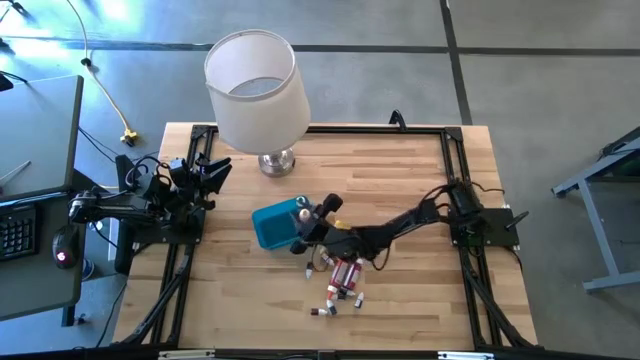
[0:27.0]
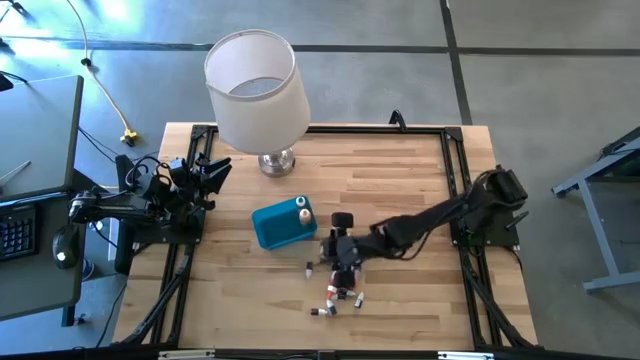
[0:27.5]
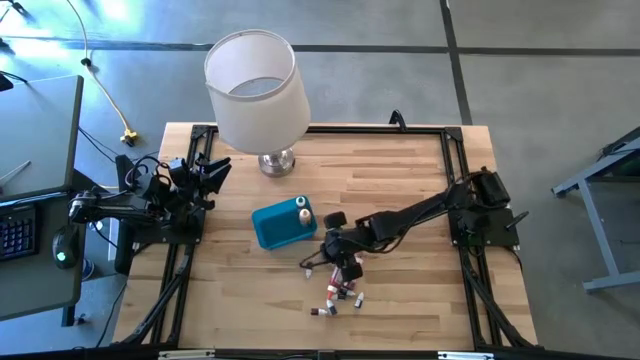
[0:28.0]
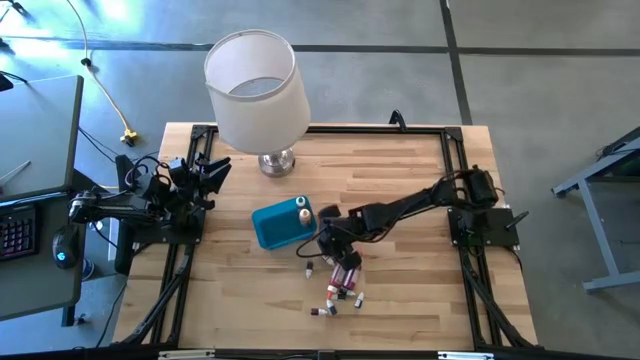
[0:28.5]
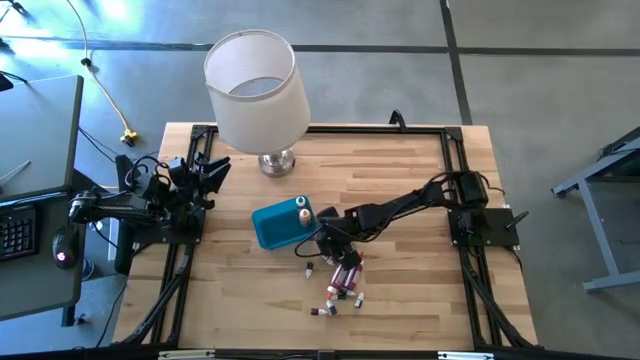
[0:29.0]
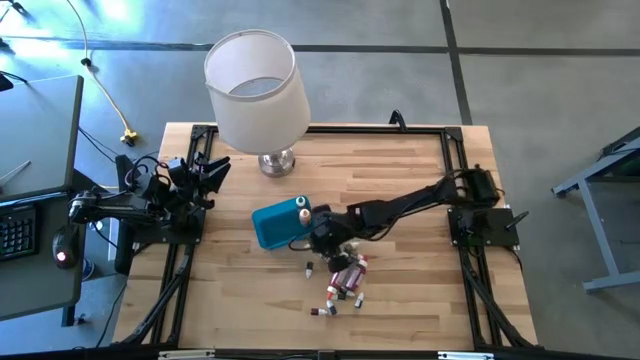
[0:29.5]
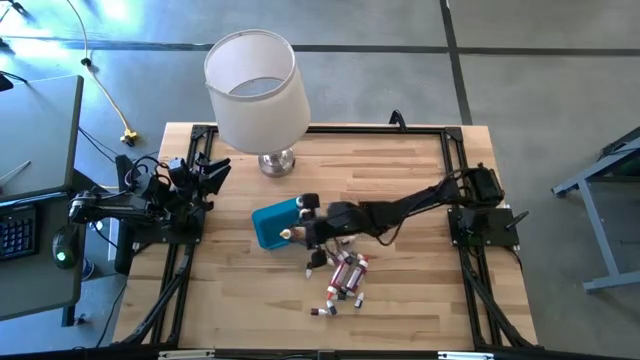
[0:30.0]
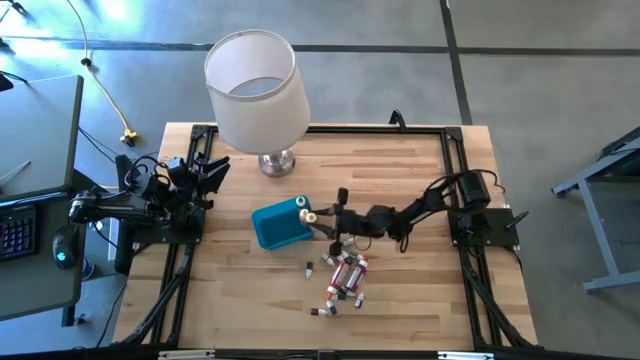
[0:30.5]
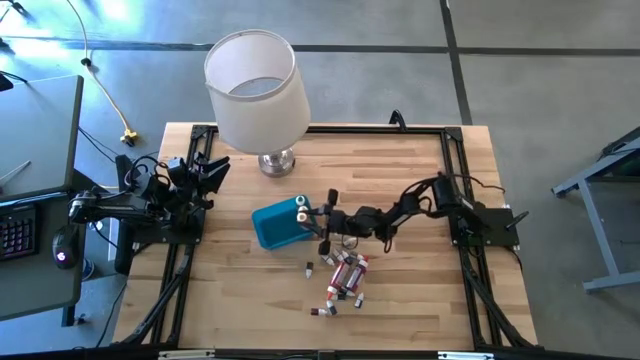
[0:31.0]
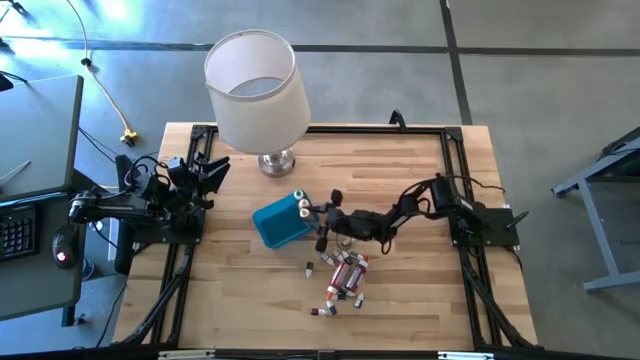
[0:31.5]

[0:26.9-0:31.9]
Task: Pick & Place food coloring
Put the large yellow food coloring bottle into the blue bin

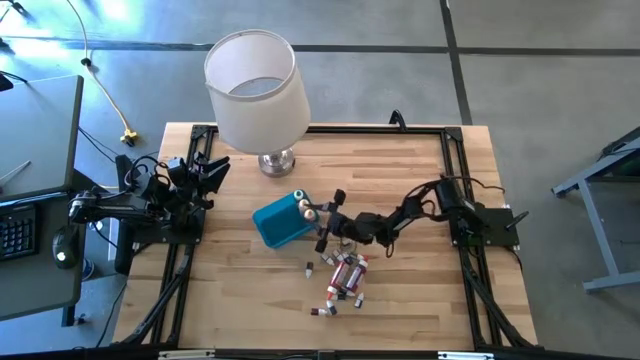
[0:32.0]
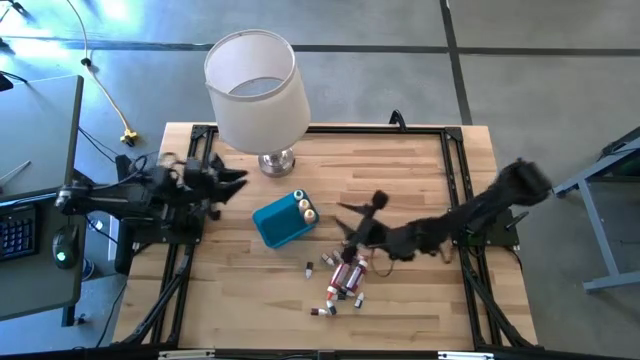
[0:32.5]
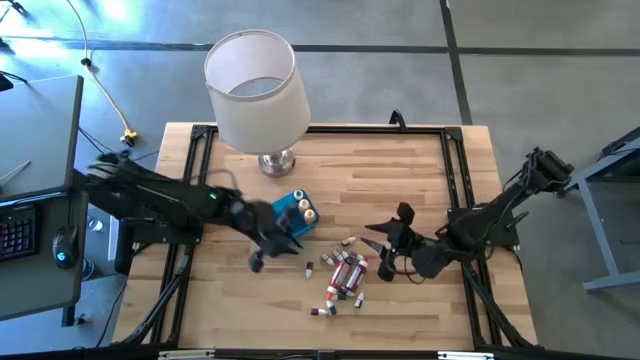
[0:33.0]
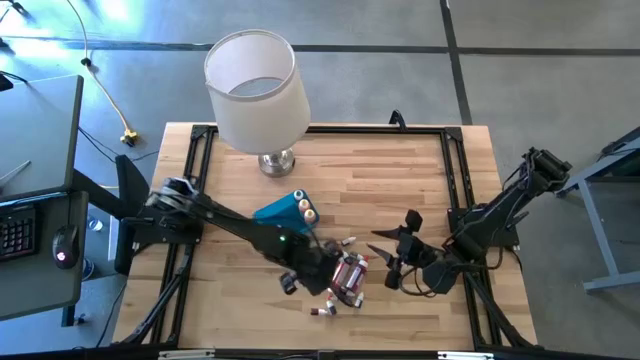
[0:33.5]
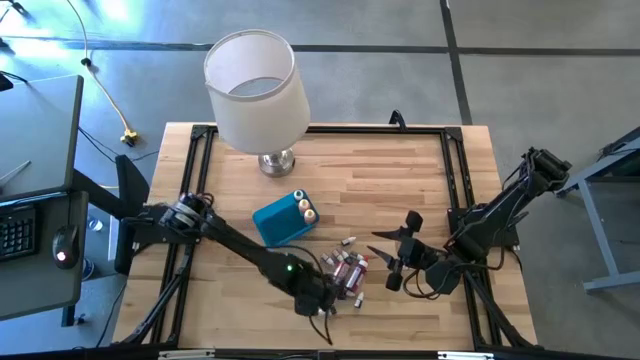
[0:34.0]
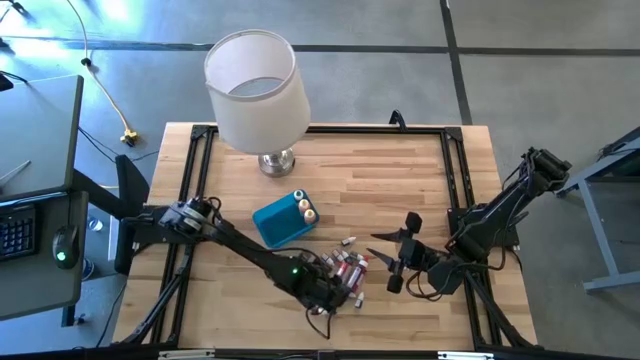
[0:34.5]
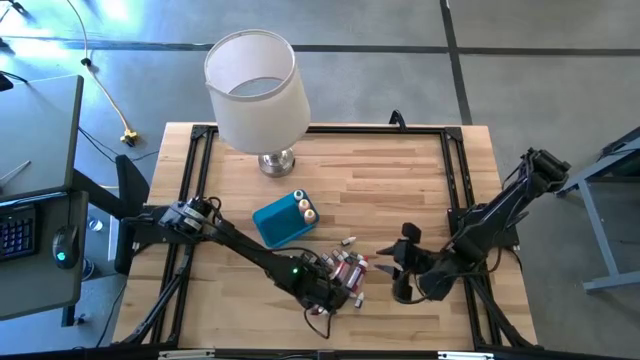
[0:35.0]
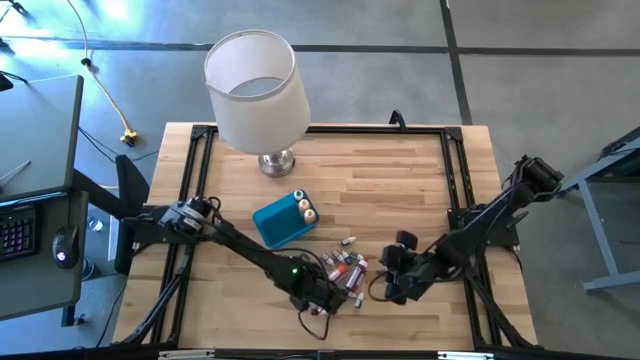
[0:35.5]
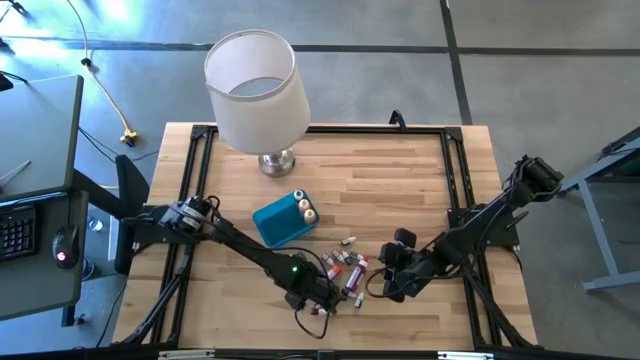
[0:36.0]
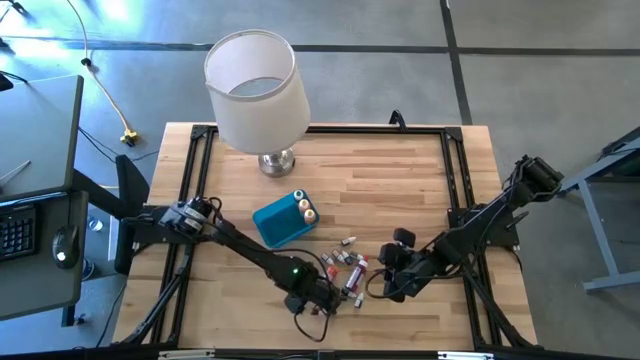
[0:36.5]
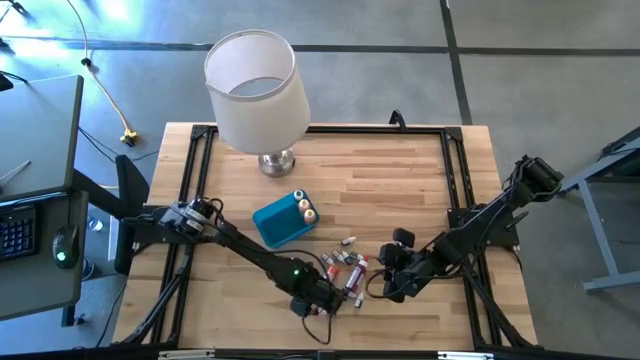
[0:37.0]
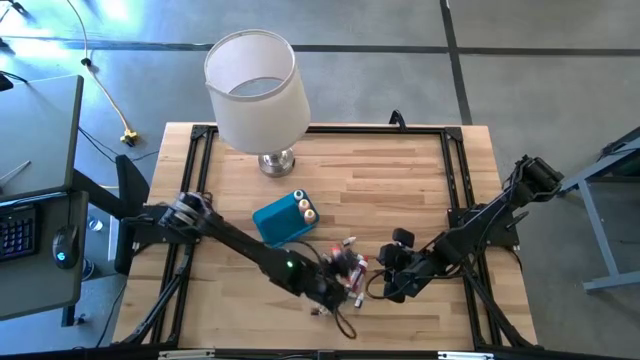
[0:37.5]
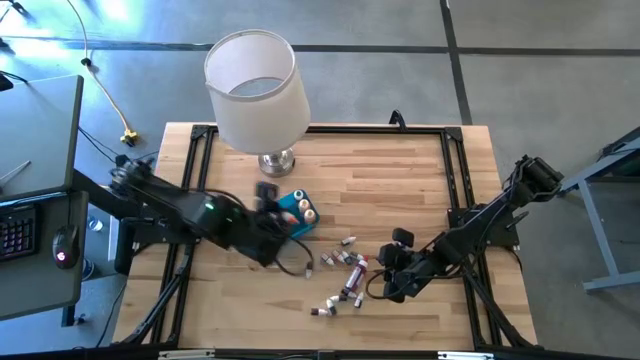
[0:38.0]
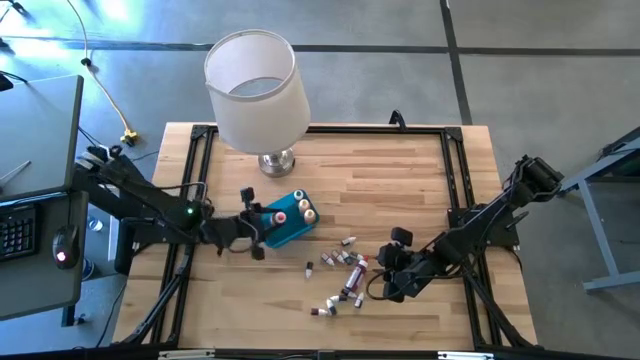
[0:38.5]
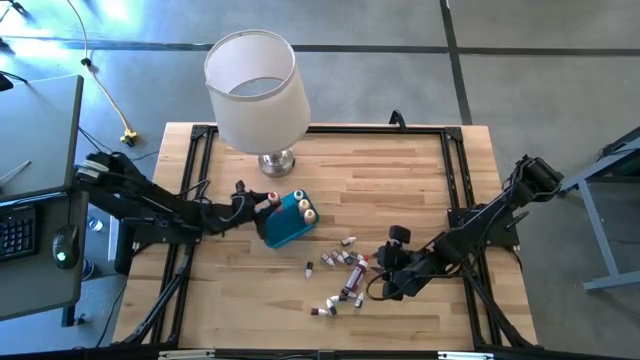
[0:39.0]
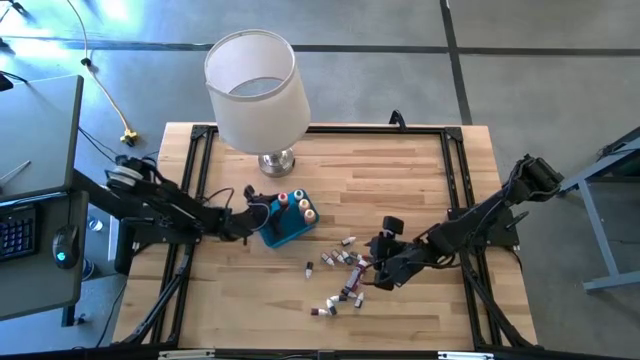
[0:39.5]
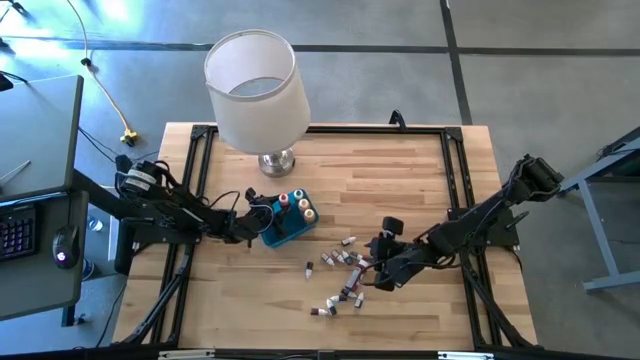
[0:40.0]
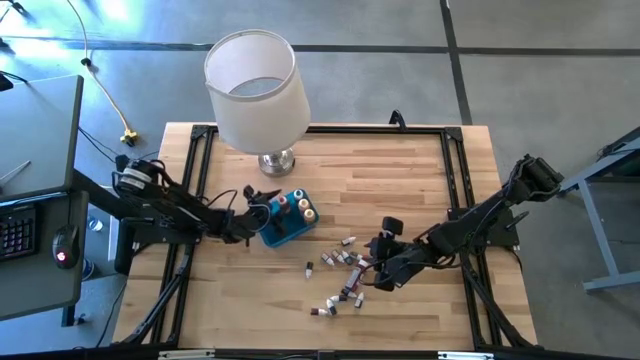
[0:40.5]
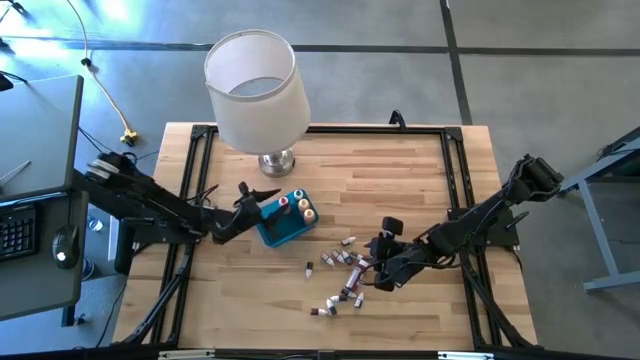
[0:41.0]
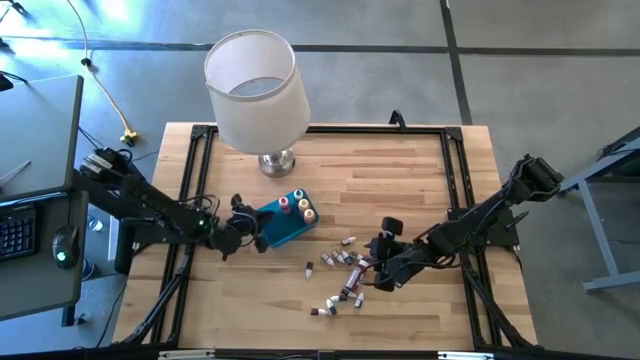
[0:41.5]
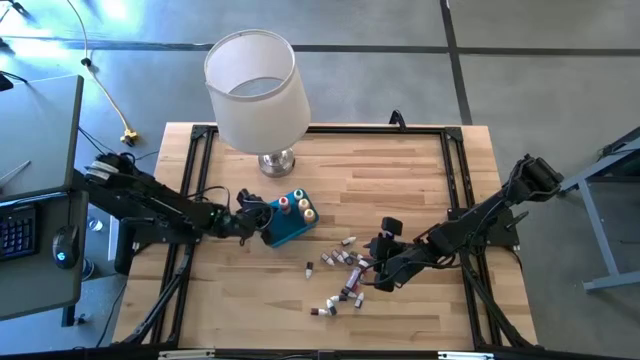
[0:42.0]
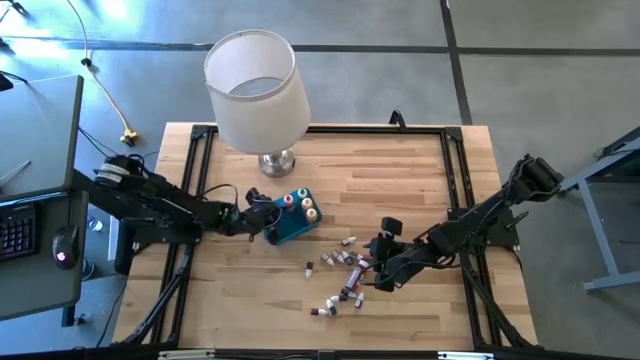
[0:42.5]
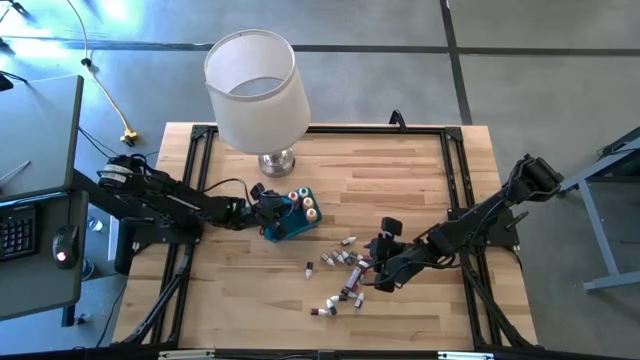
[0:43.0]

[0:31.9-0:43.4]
Put the right large orange food coloring bottle into the blue bin

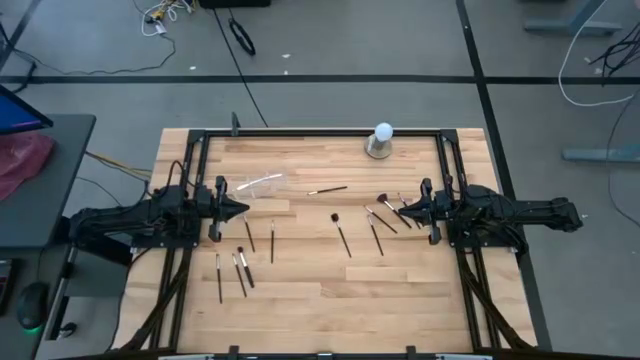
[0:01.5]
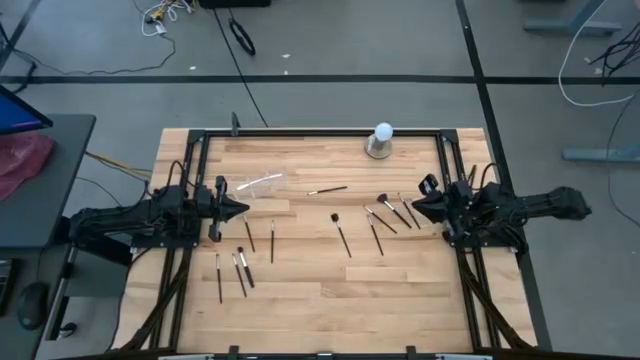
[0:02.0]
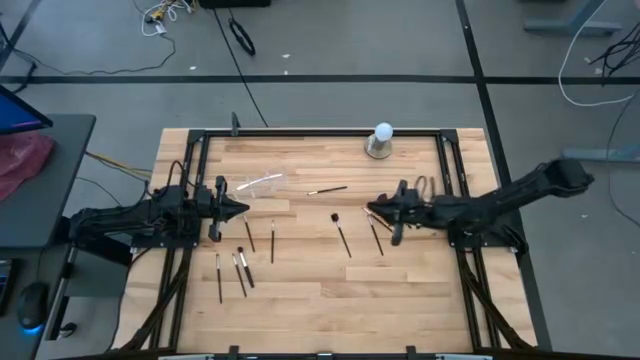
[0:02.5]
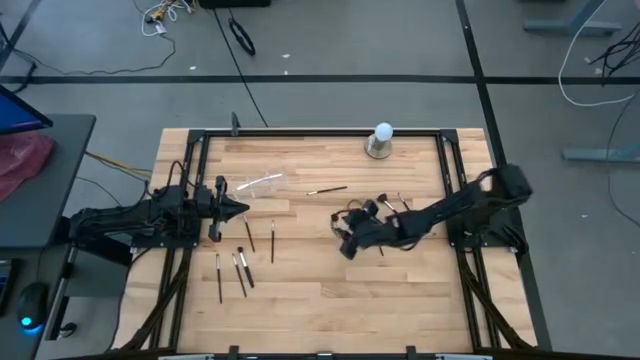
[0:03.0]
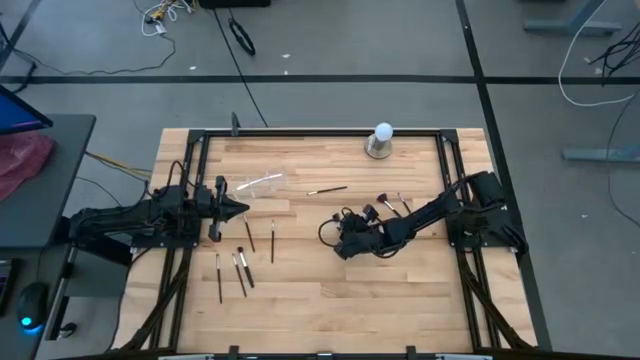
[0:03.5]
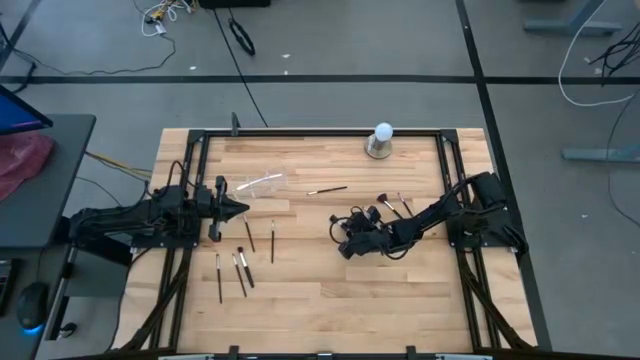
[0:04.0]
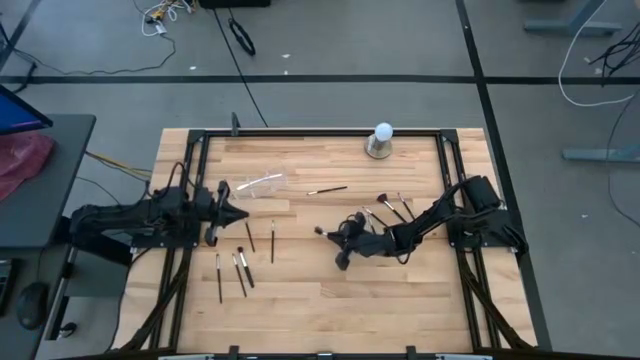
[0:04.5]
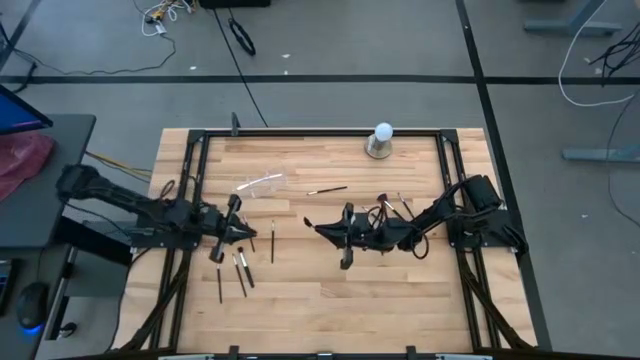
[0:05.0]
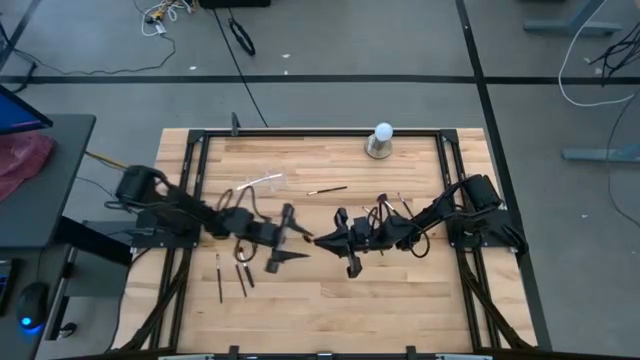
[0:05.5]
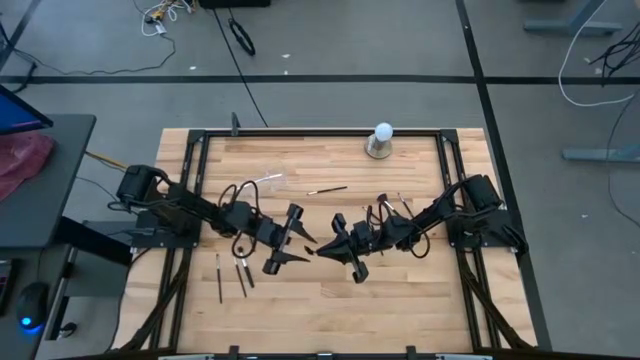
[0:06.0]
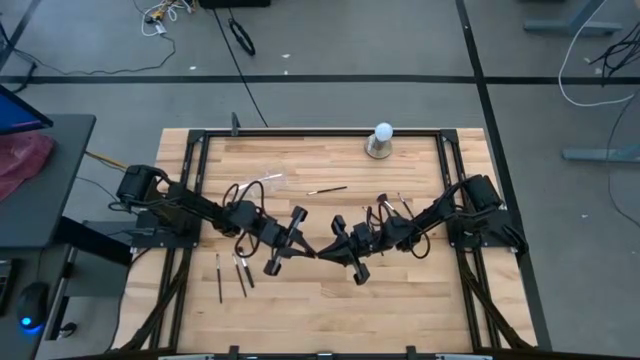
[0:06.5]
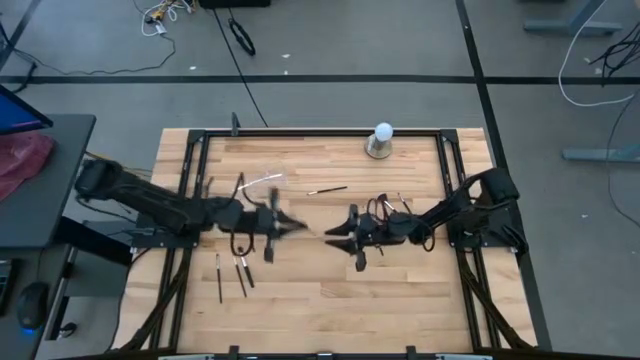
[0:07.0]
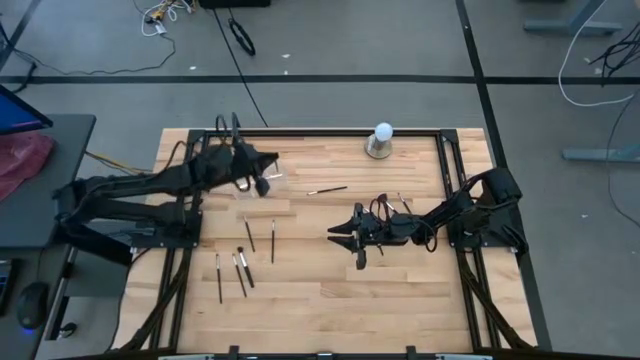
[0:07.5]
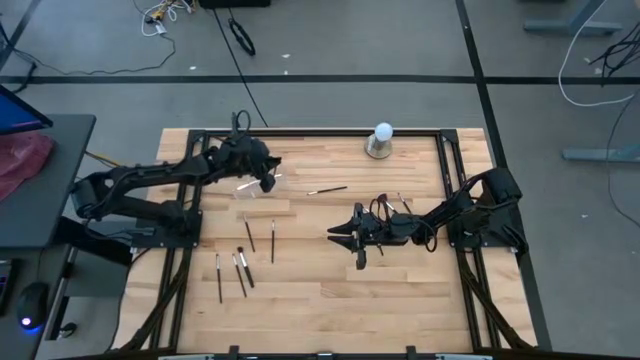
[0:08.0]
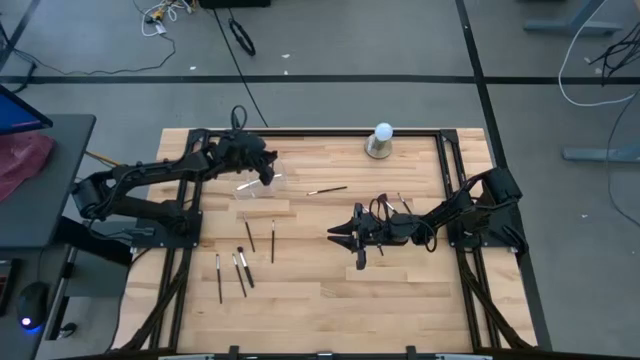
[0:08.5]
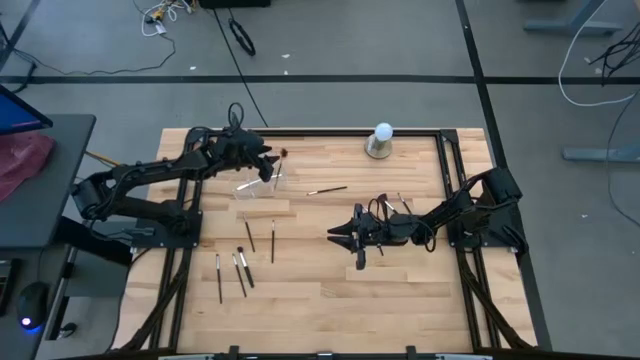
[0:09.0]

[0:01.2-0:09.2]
Task: Put items in baskets/containers
Put the black eye groomer brush into the right section of the transparent organizer
